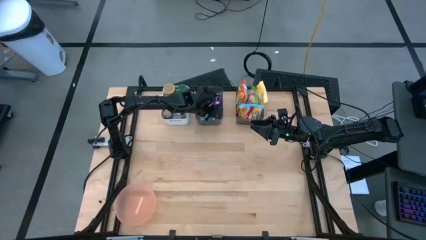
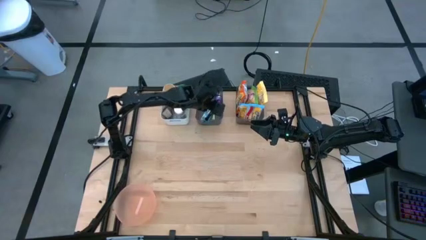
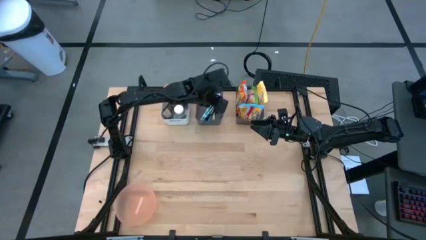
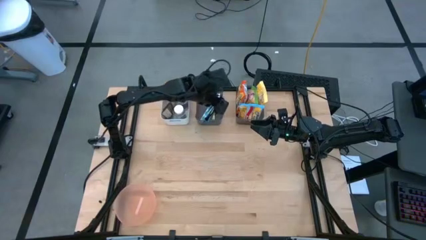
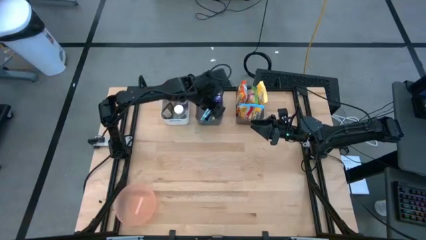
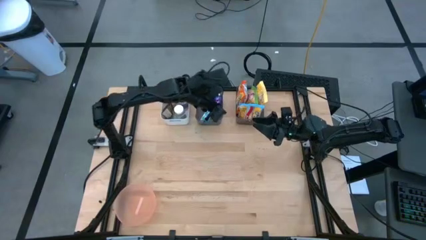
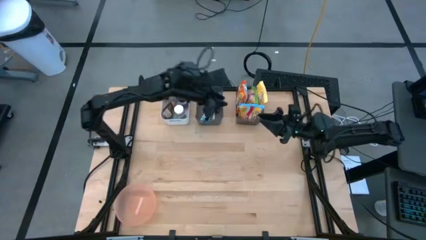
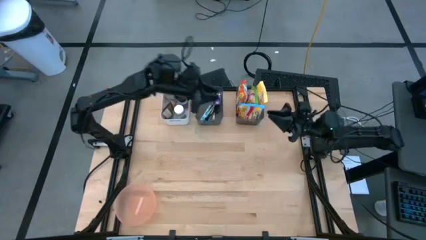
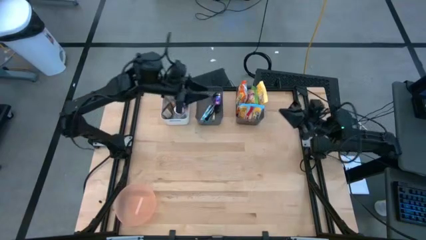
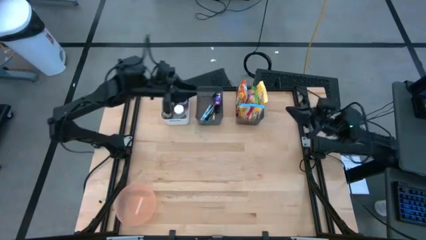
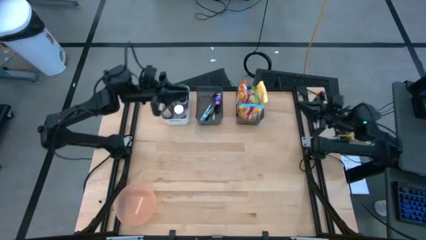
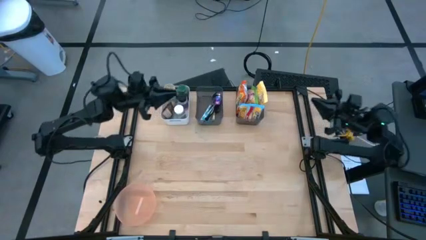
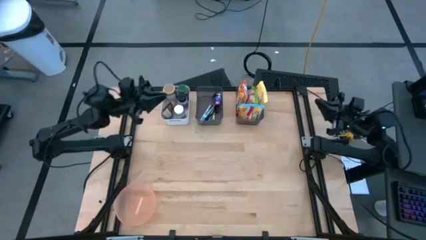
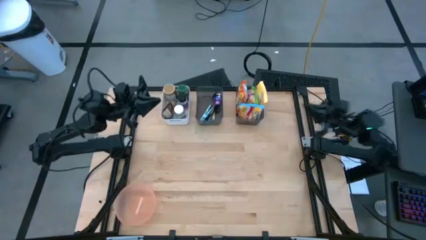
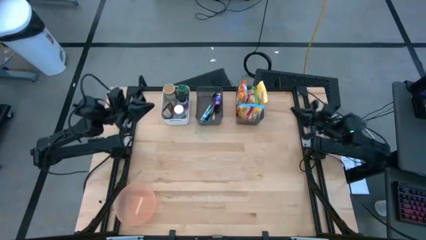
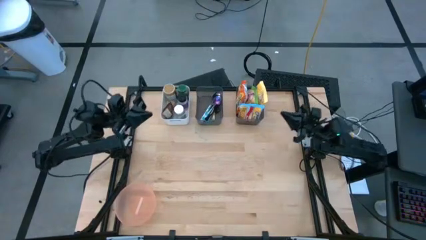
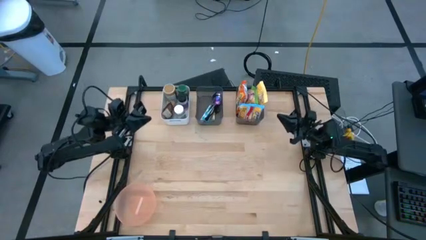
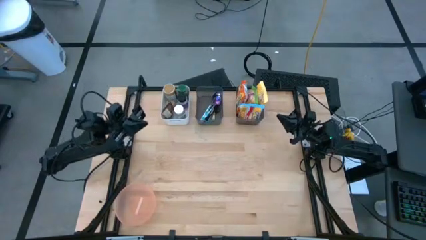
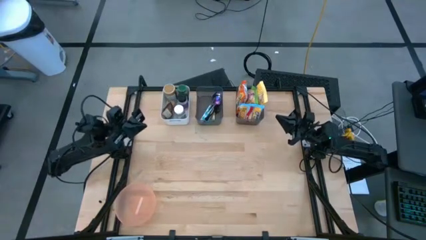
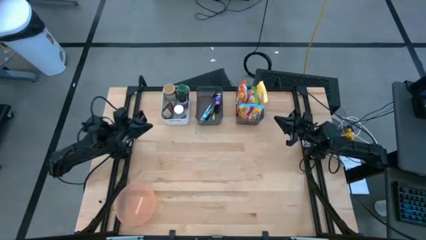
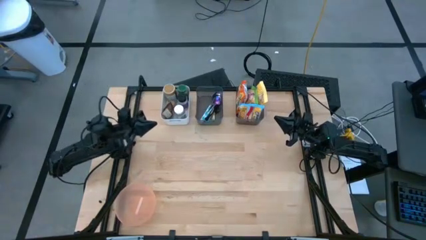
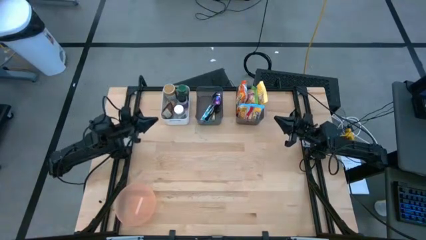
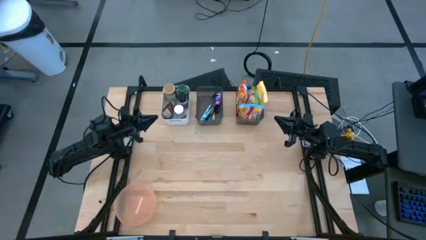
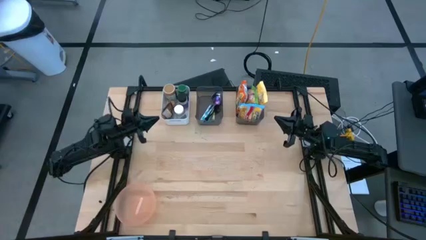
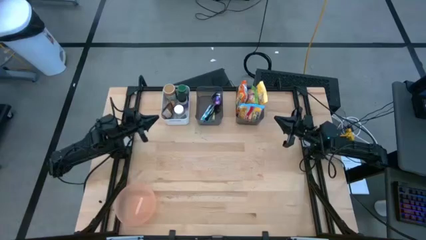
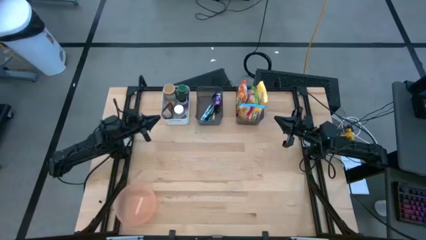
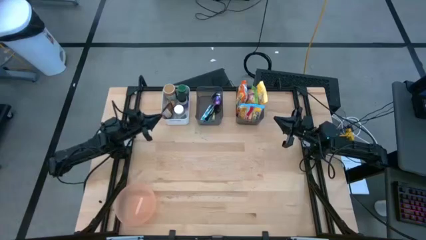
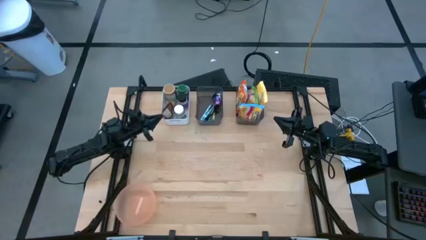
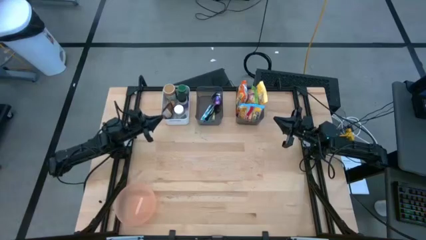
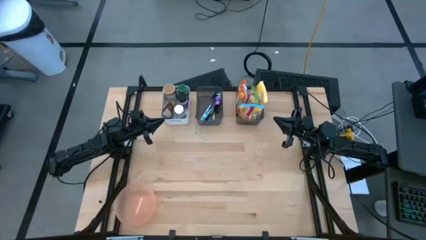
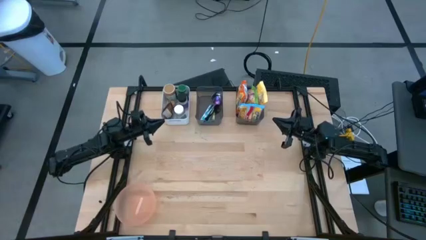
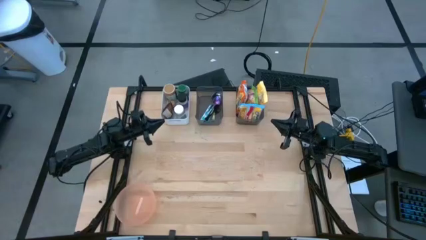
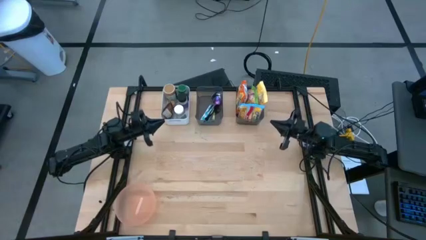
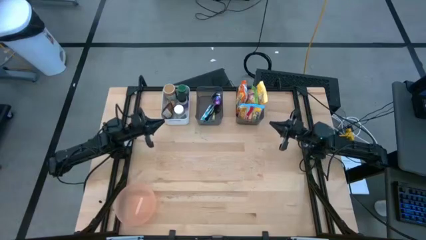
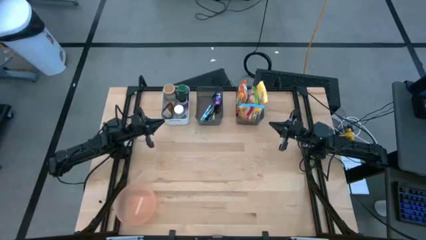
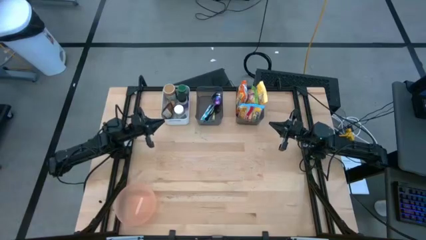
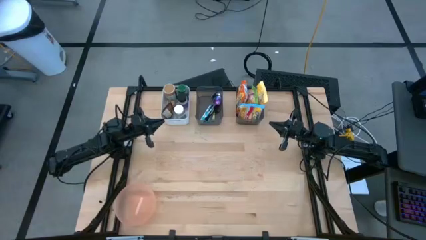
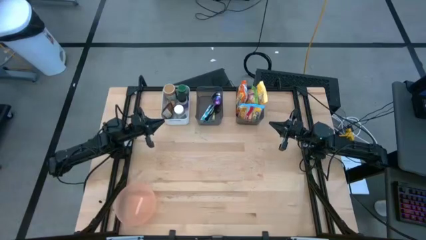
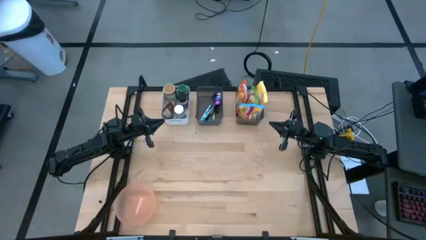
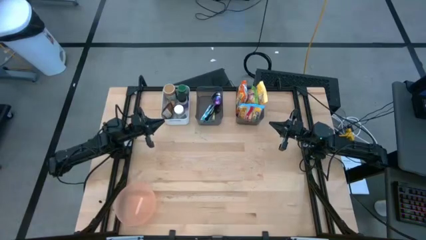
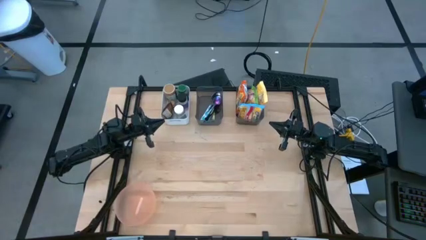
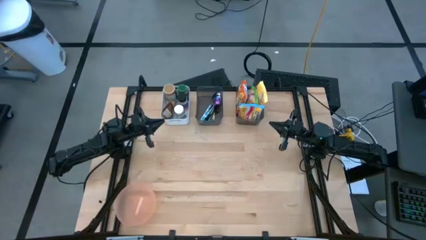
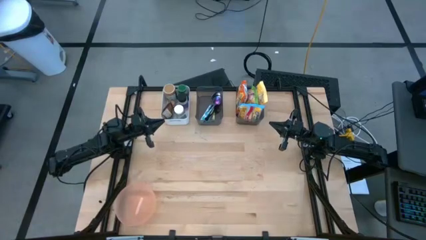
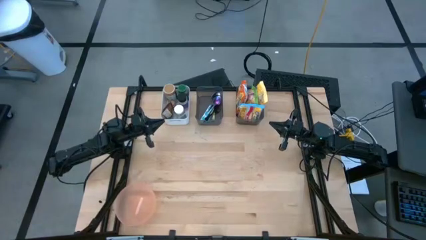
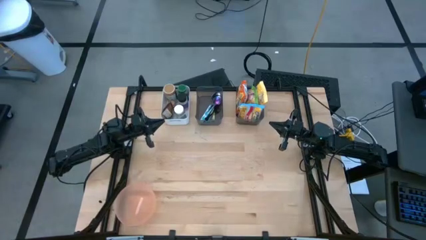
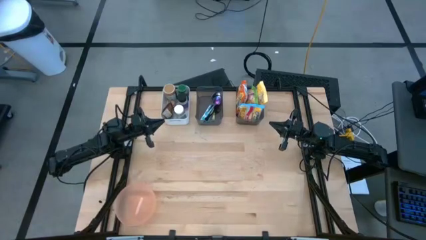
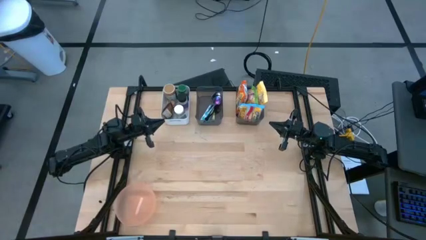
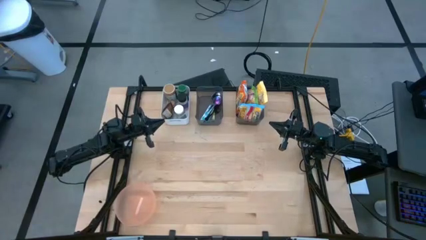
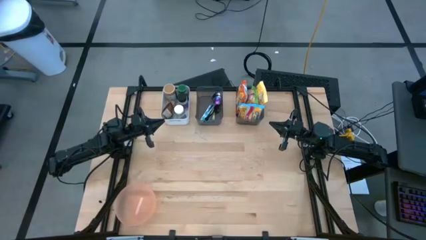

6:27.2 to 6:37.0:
Task: Pick & Place Food Item
Return to Home Position

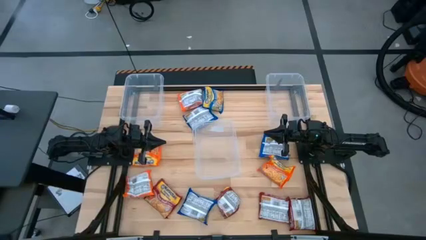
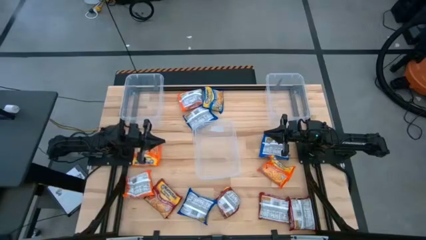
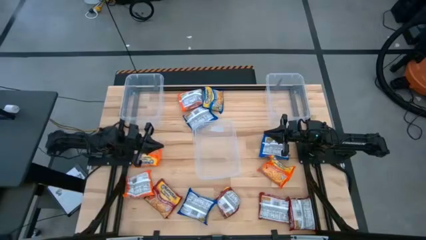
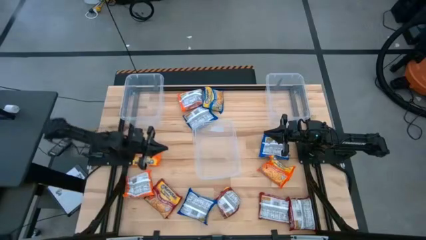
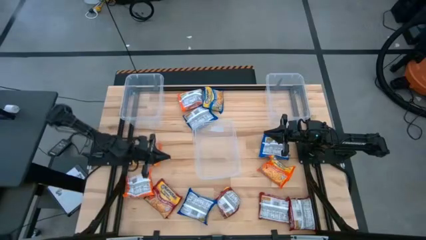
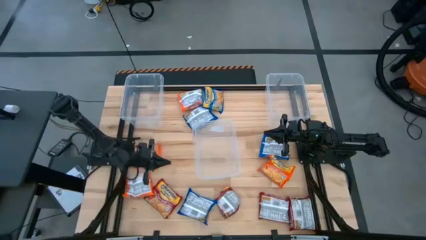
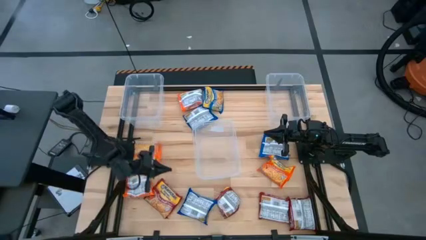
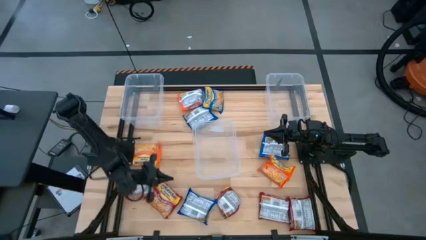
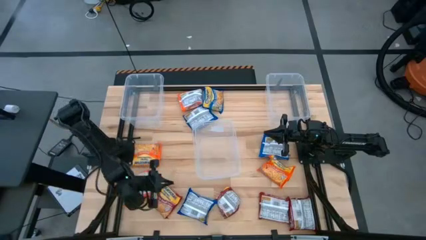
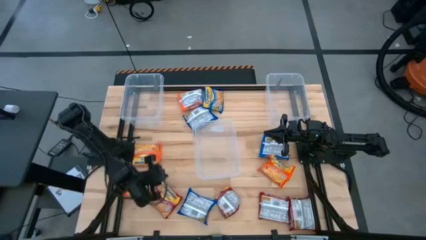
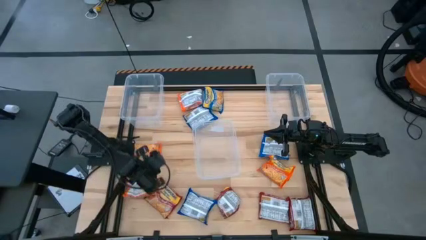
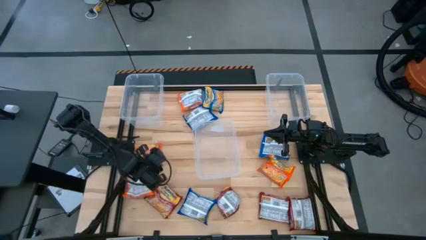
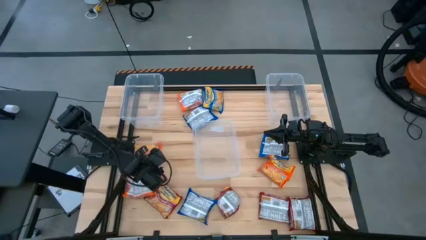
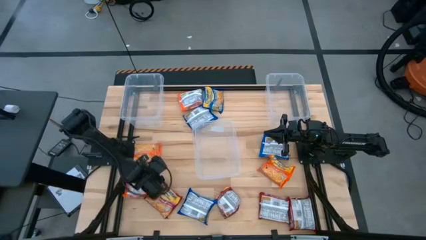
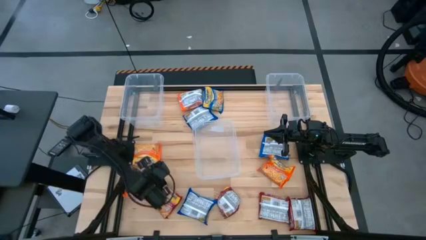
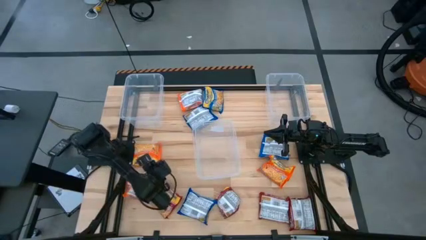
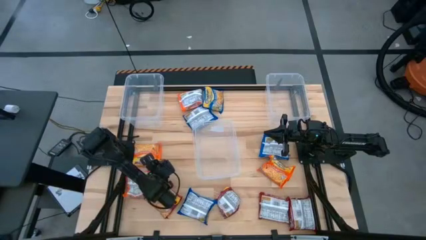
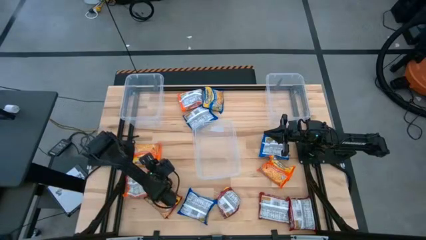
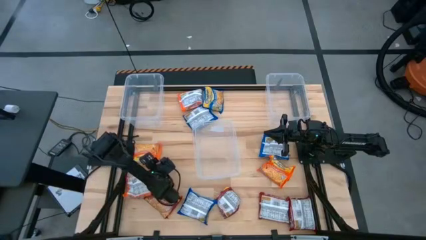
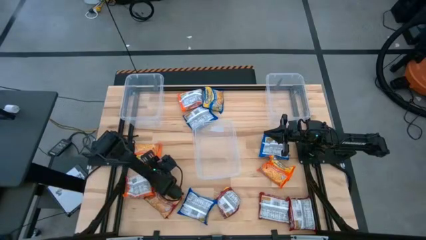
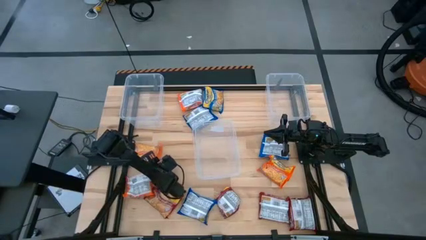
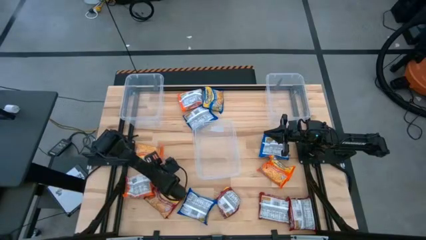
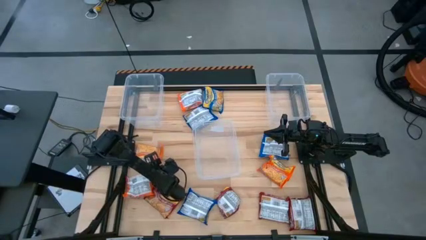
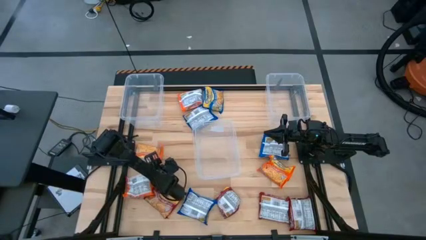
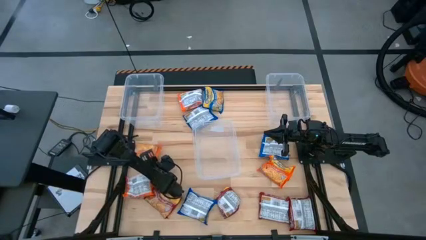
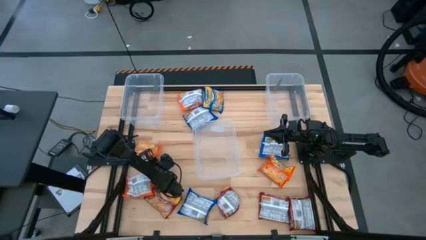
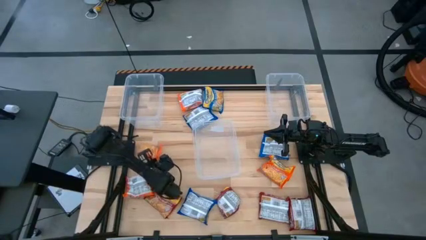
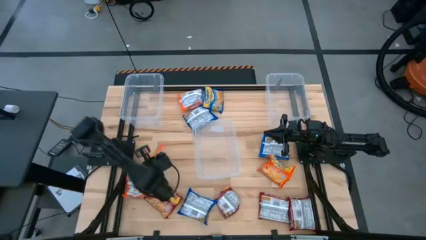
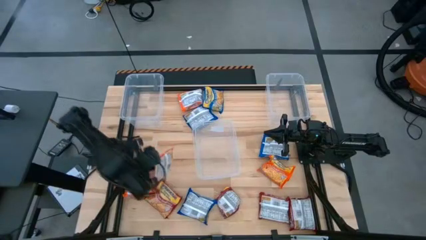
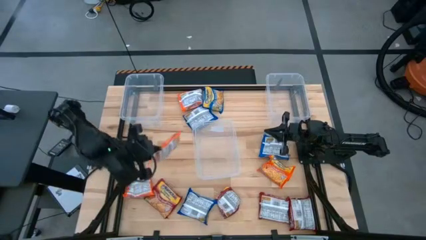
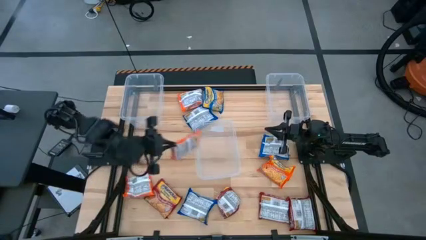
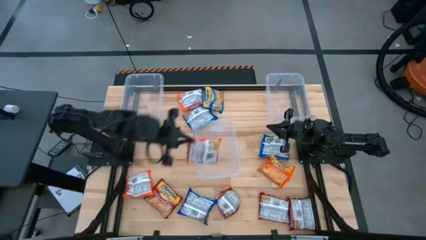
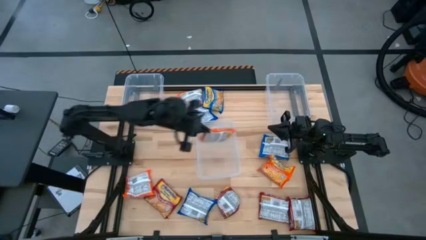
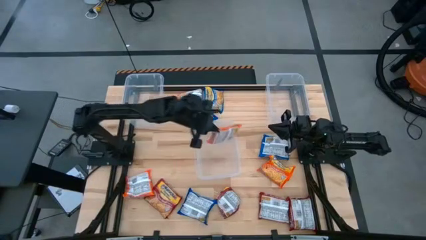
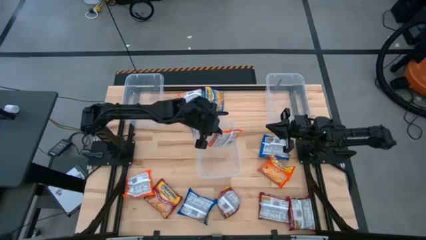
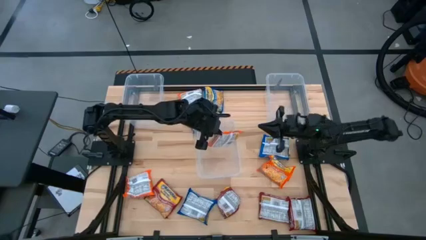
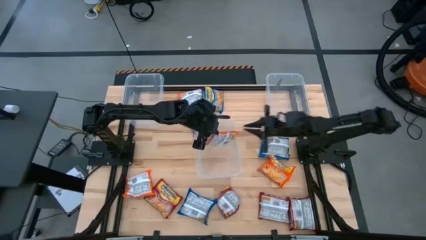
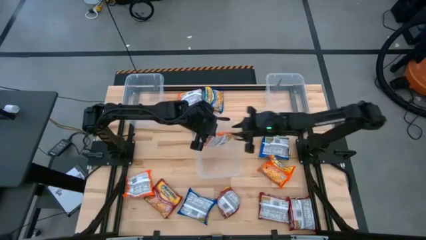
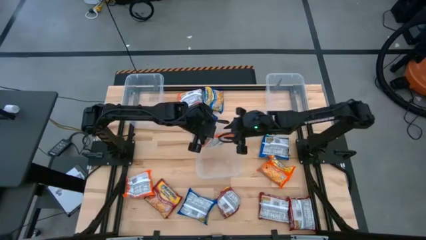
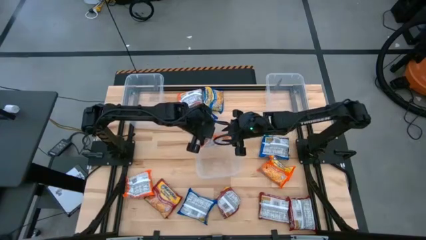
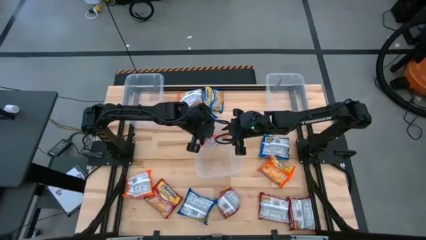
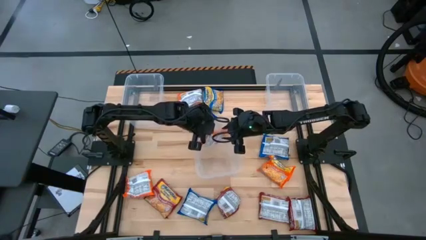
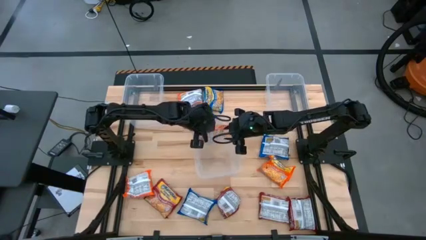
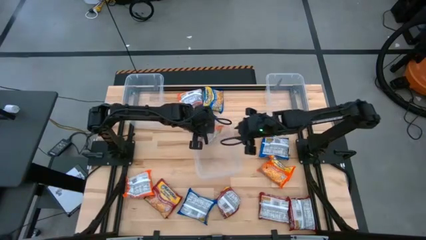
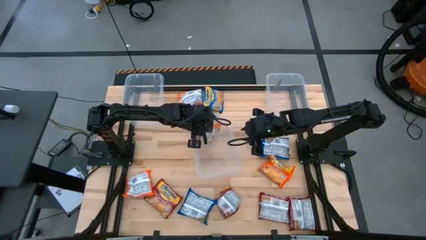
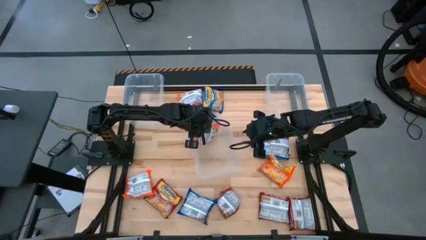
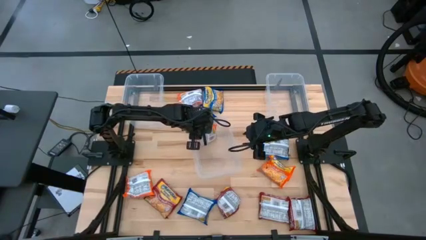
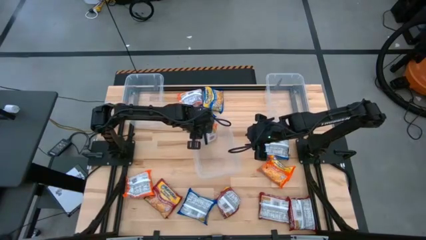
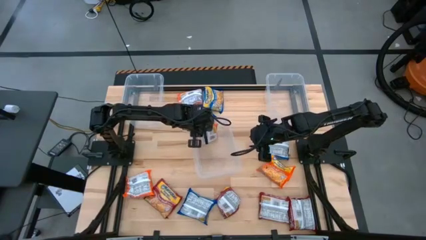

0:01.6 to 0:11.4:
Task: Sort Maruchan noodles
Put the orange noodle pack into the middle transparent bin
